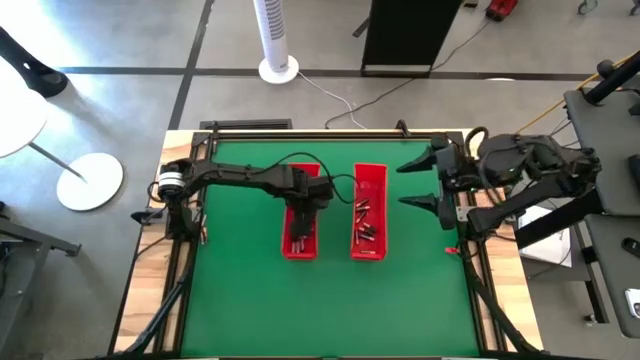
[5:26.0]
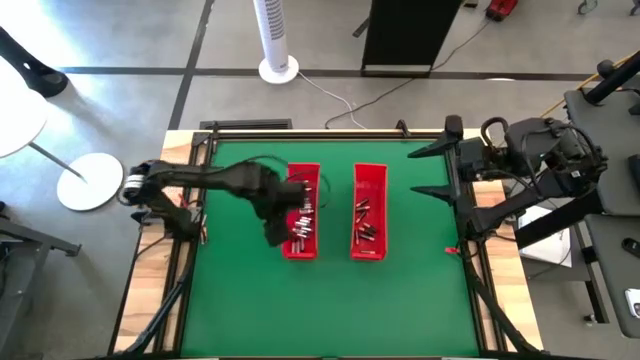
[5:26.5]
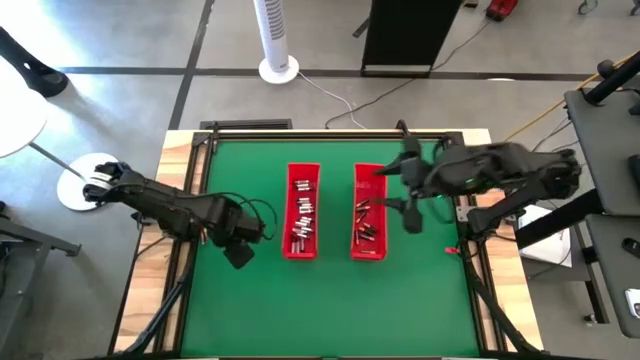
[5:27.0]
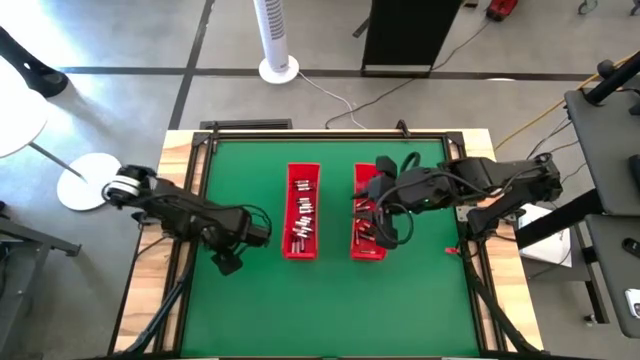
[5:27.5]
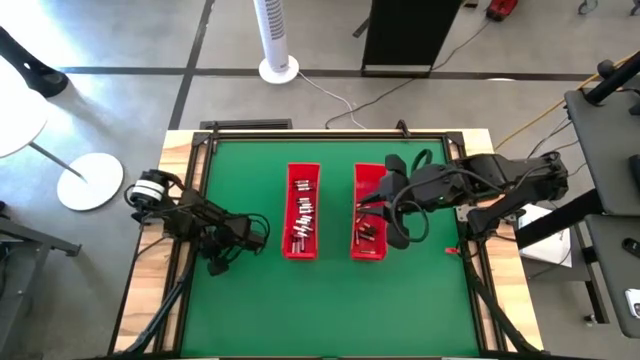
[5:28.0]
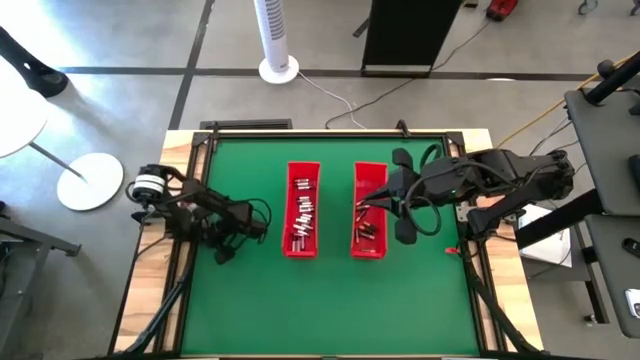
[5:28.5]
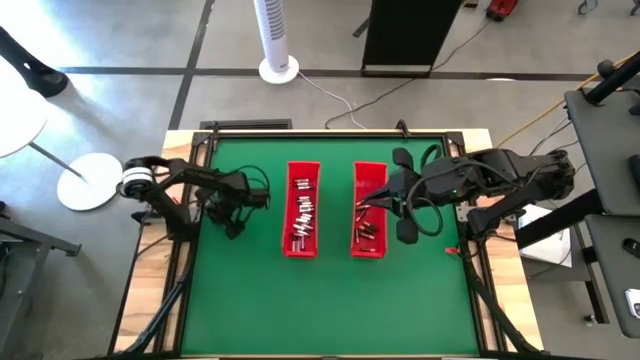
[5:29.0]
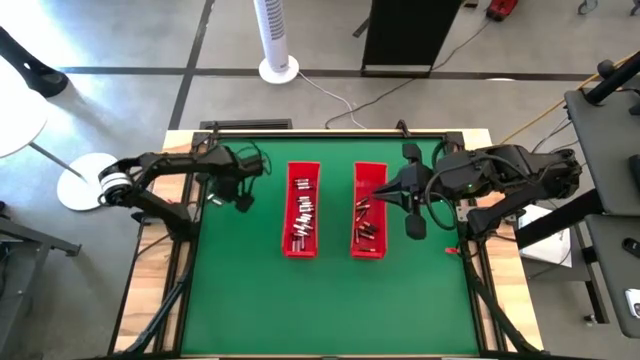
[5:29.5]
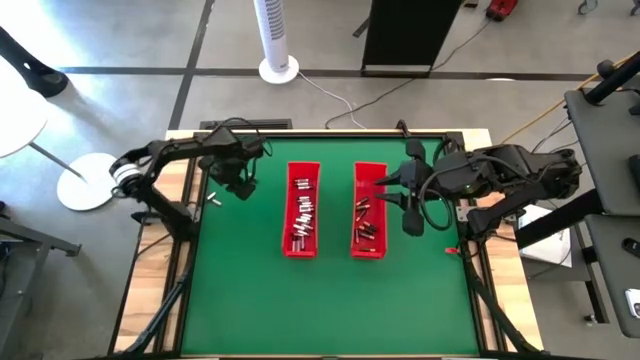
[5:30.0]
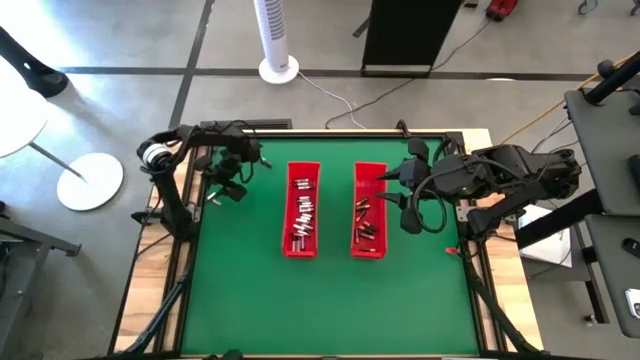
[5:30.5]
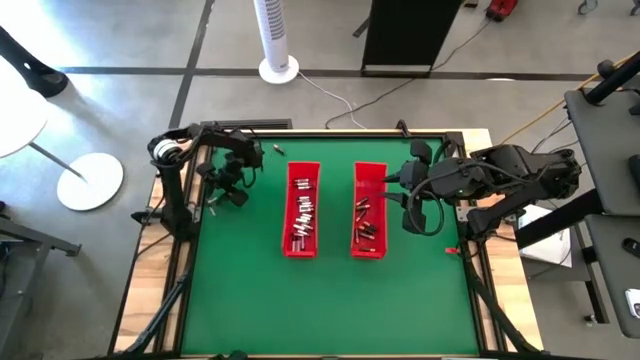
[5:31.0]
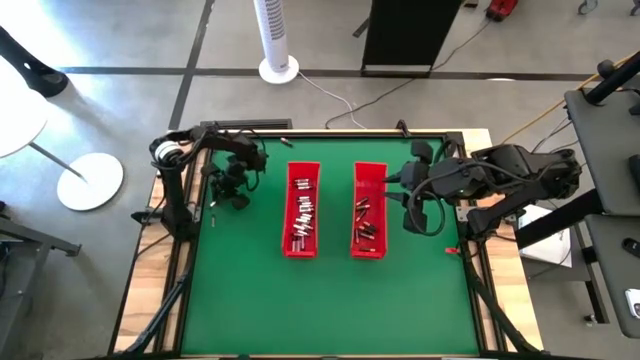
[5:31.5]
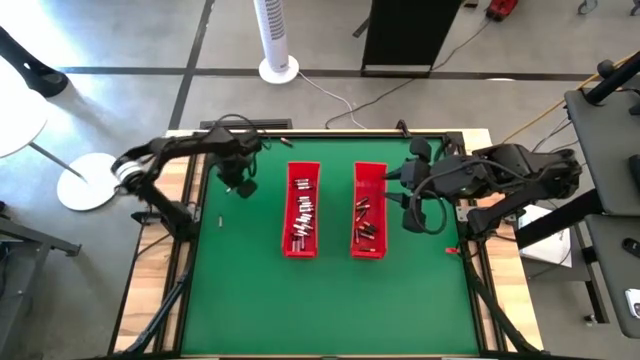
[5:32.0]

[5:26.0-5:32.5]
Task: Sort batteries
Put the silver battery into the left red bin

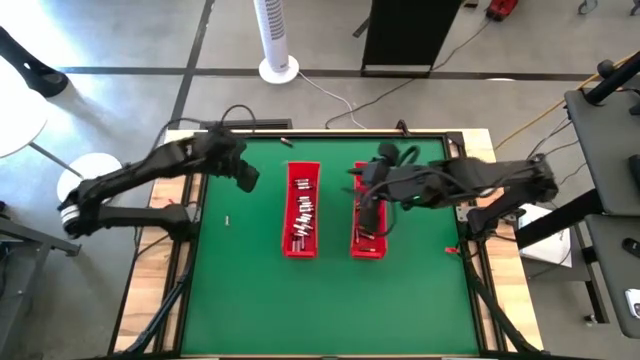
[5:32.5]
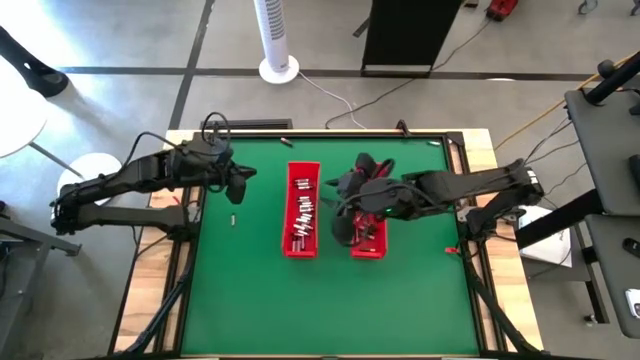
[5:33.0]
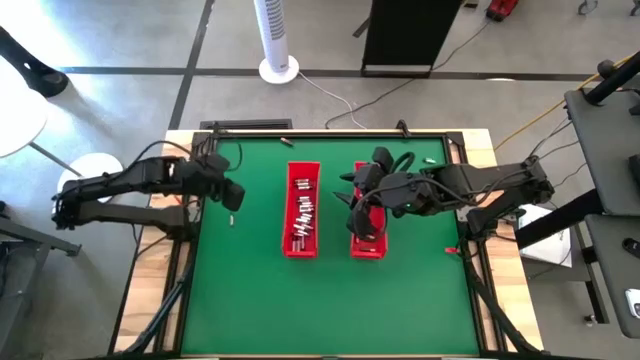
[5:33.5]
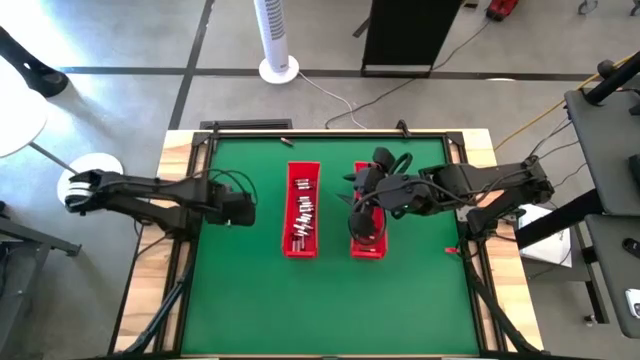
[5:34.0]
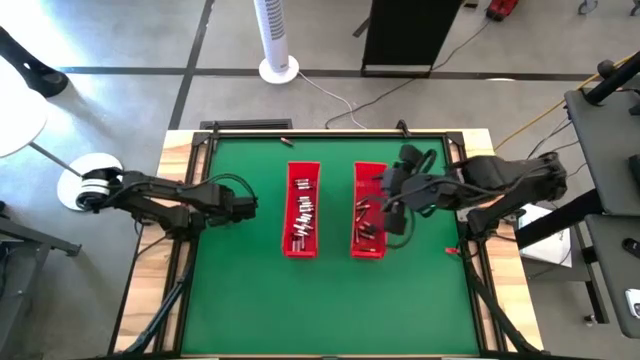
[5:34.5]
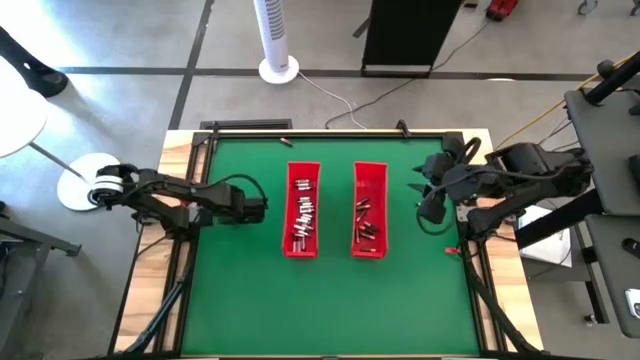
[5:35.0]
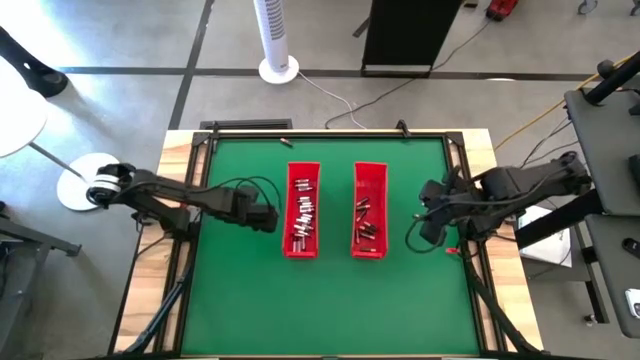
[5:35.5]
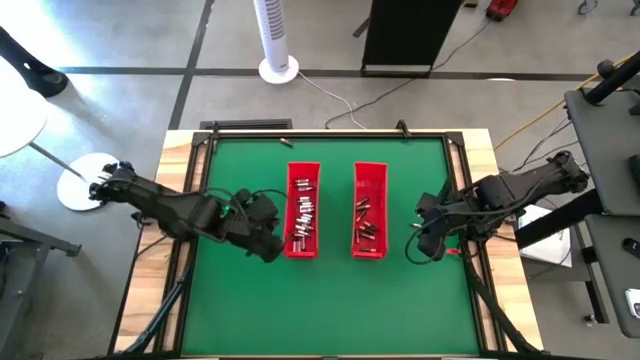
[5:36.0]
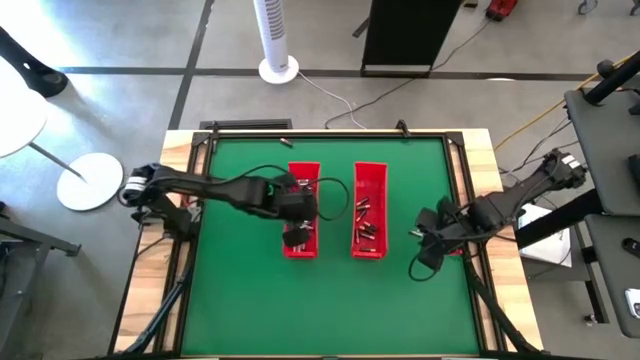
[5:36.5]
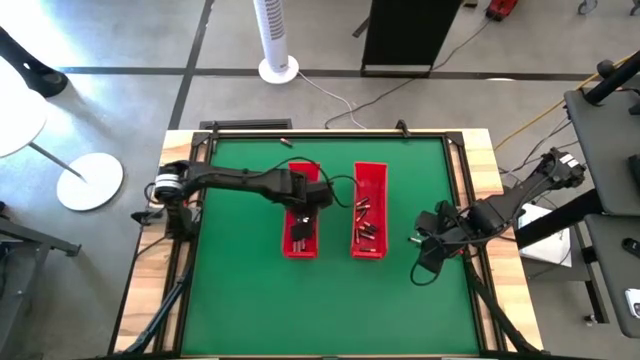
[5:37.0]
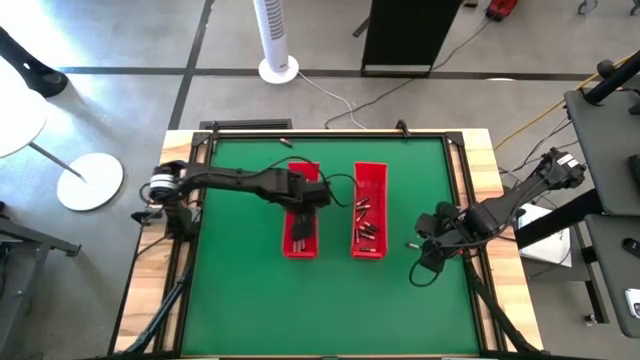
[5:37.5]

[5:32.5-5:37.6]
Put the silver battery into the left red bin

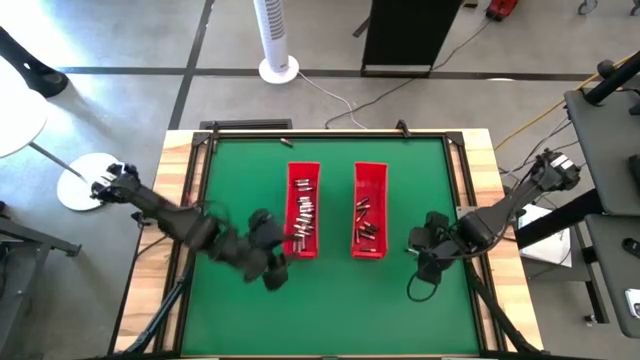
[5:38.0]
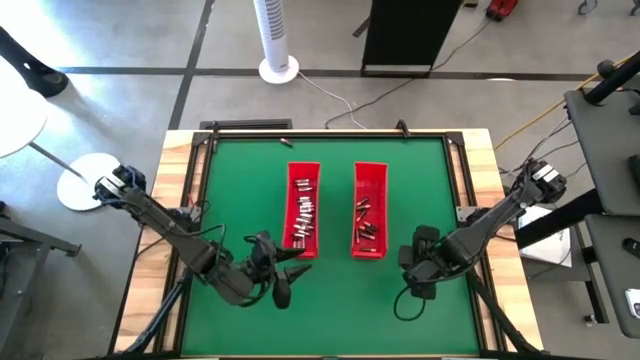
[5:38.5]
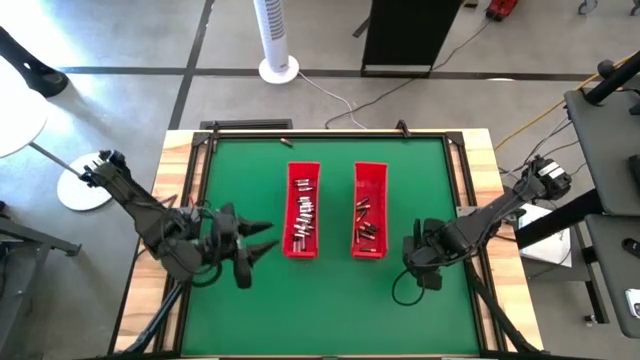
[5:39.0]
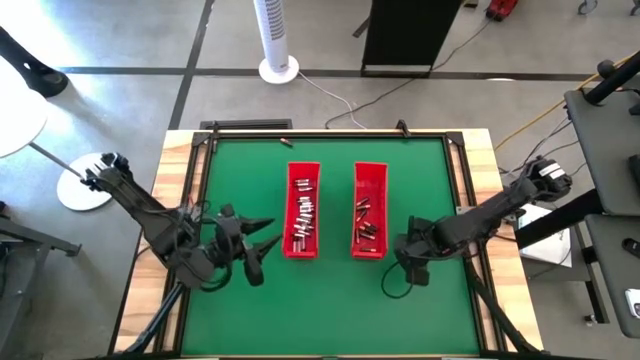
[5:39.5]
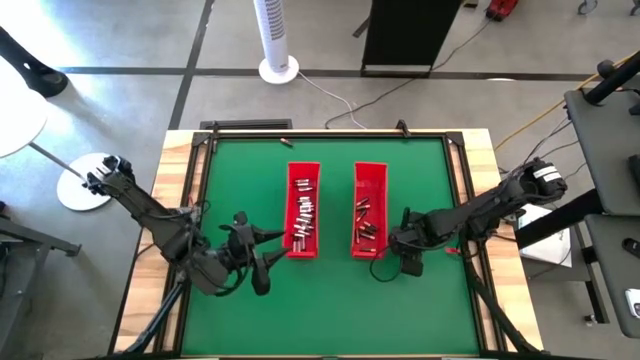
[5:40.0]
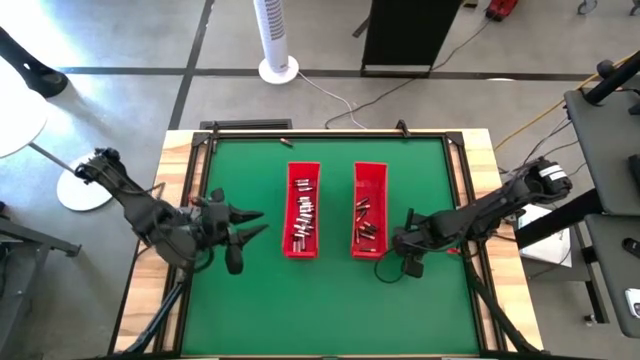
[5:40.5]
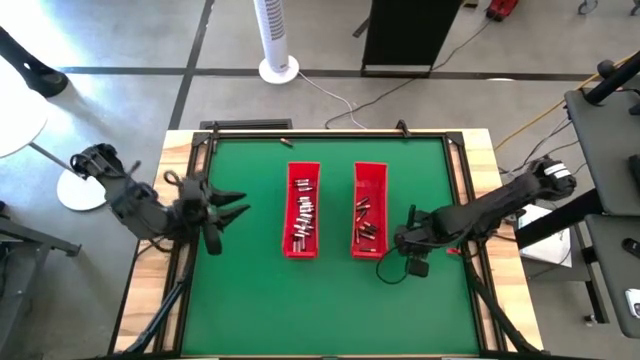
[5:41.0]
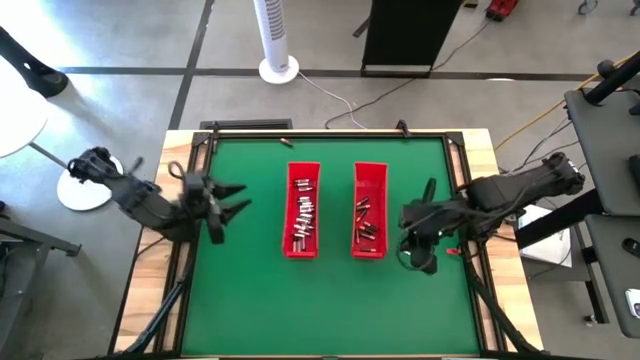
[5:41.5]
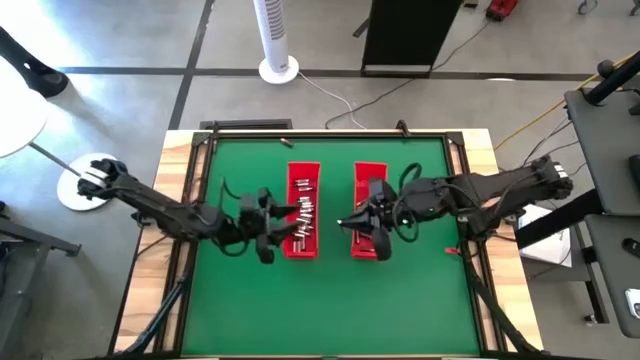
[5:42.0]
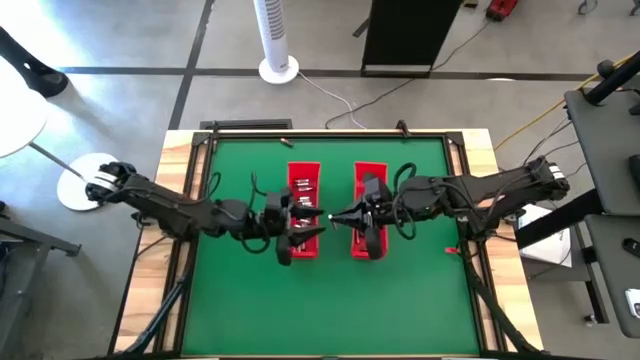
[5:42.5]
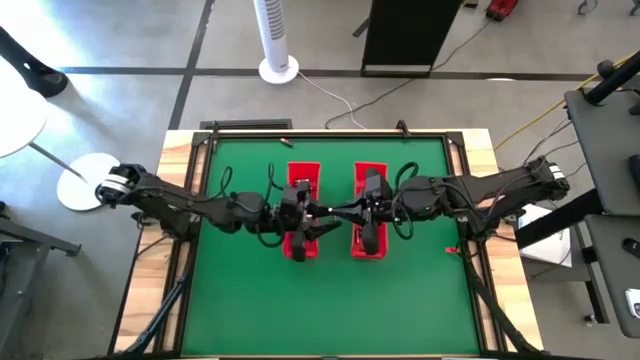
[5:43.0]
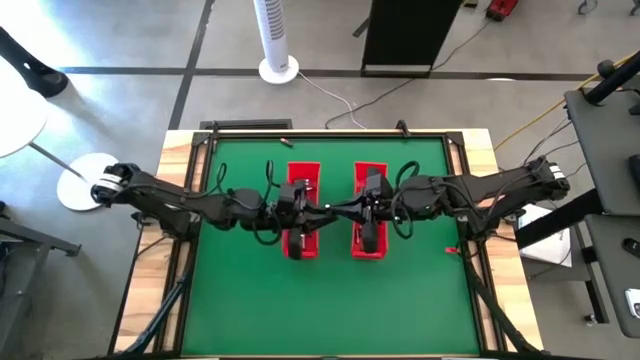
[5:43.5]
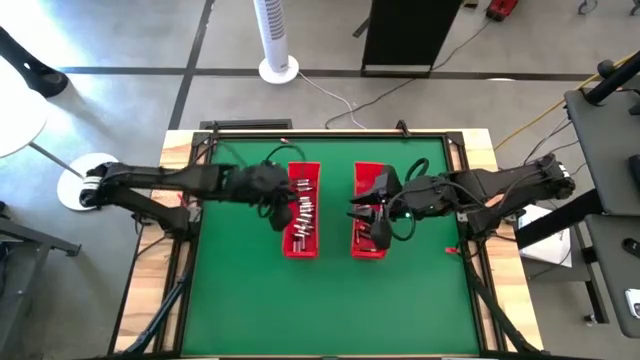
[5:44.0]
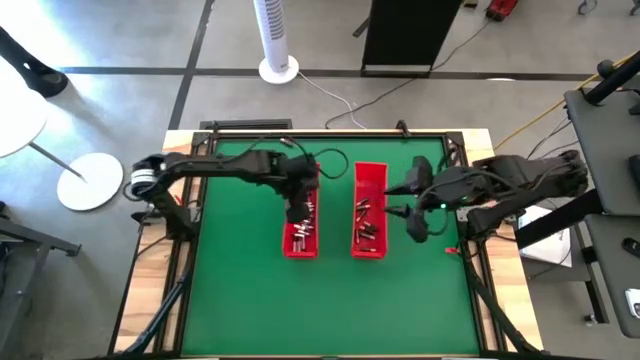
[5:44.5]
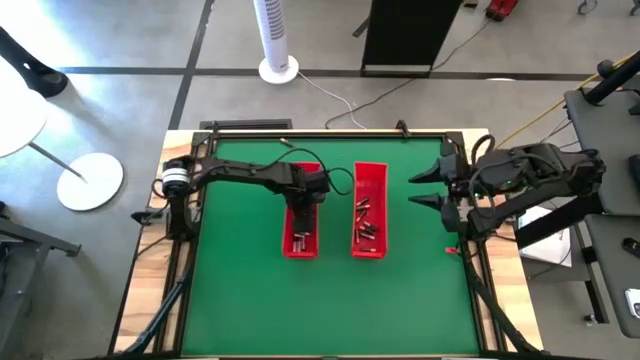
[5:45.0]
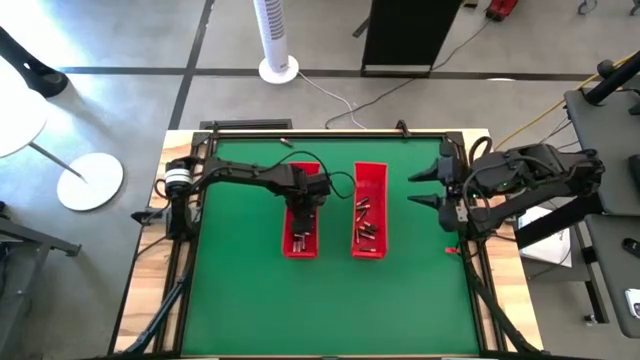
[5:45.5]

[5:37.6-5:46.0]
Put the silver battery into the left red bin
